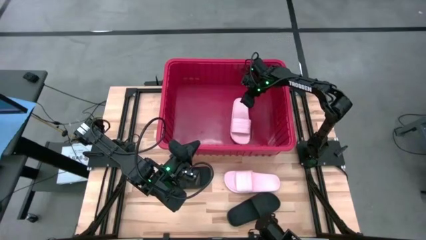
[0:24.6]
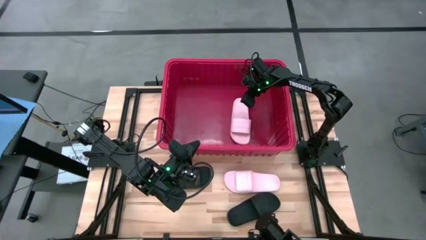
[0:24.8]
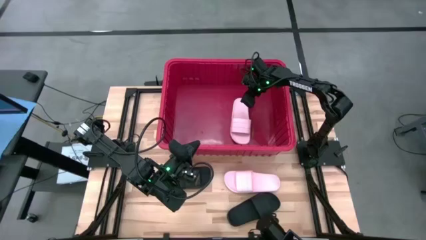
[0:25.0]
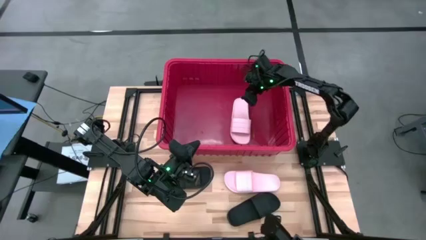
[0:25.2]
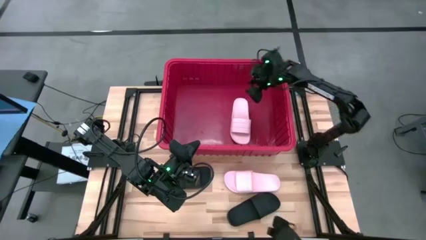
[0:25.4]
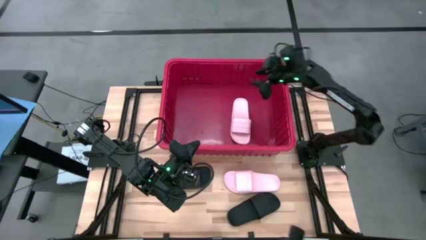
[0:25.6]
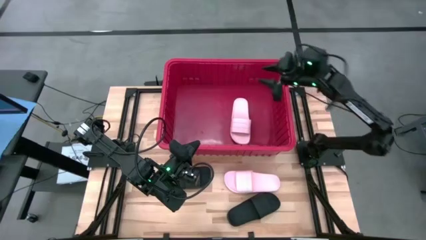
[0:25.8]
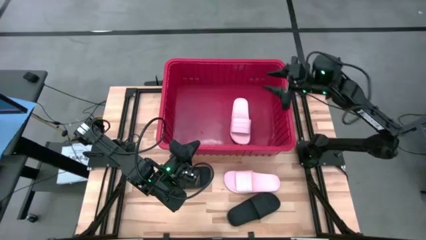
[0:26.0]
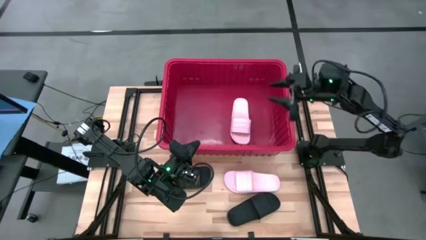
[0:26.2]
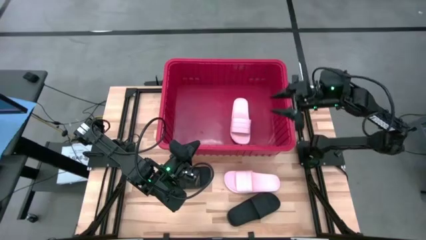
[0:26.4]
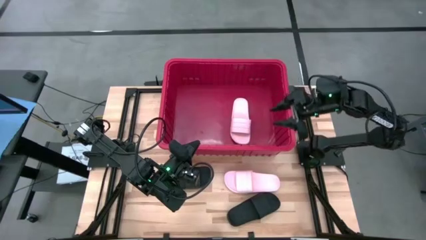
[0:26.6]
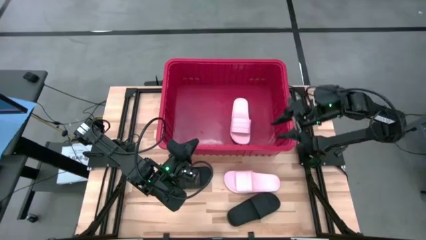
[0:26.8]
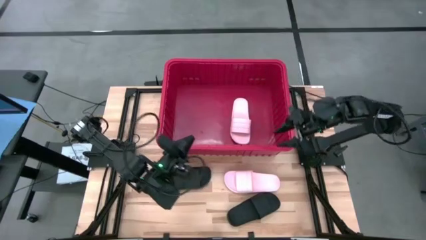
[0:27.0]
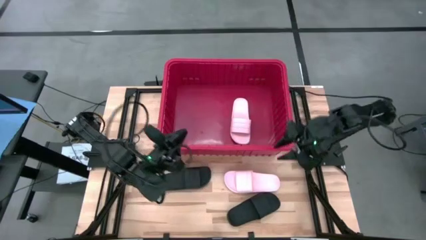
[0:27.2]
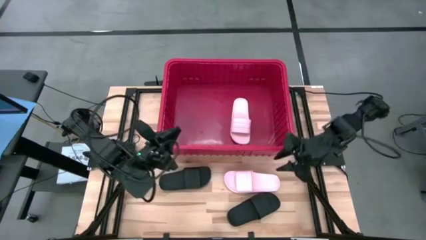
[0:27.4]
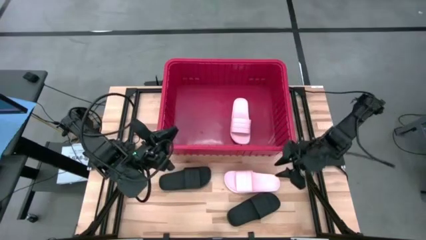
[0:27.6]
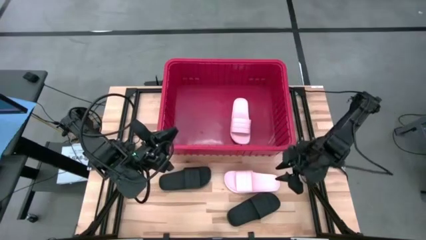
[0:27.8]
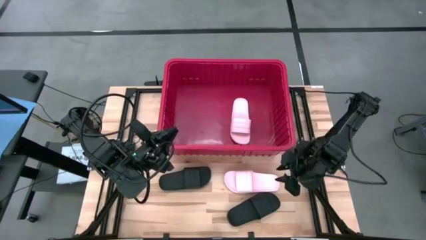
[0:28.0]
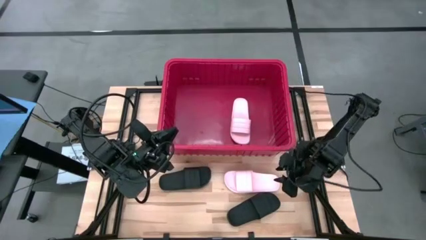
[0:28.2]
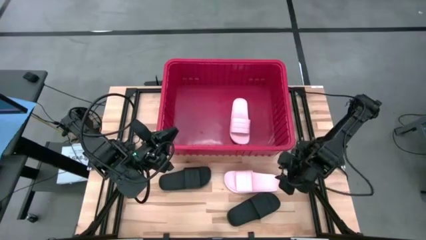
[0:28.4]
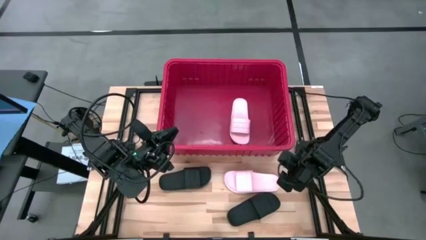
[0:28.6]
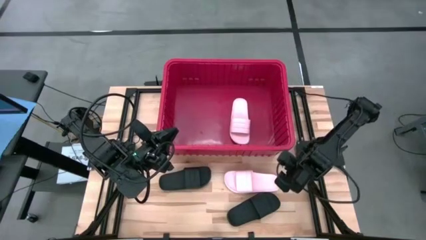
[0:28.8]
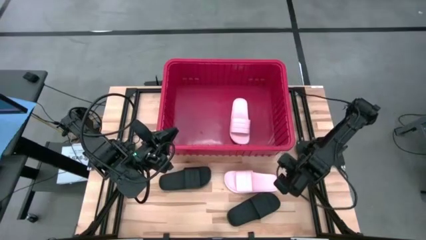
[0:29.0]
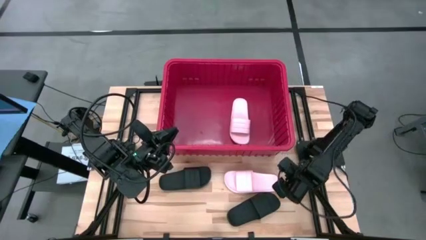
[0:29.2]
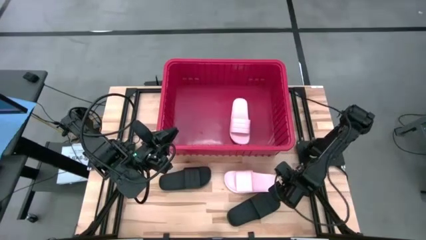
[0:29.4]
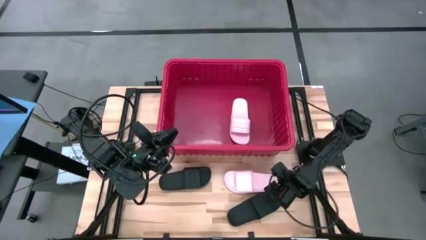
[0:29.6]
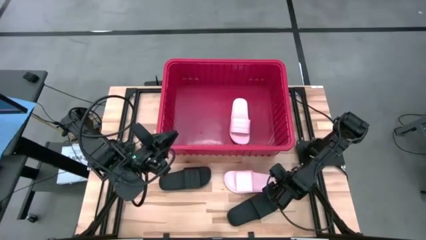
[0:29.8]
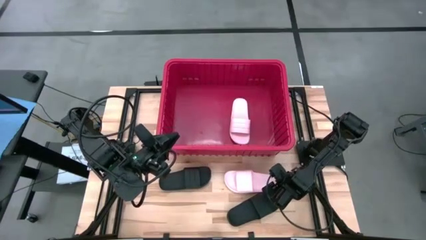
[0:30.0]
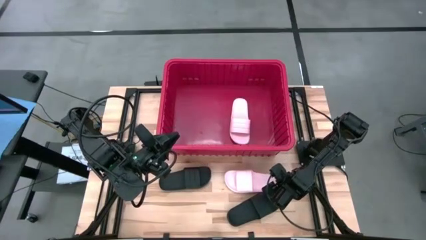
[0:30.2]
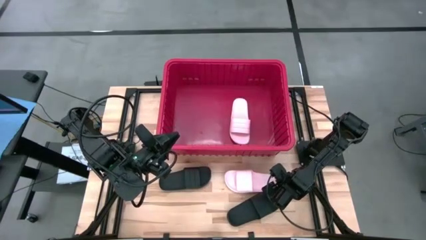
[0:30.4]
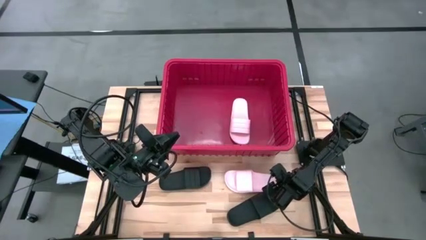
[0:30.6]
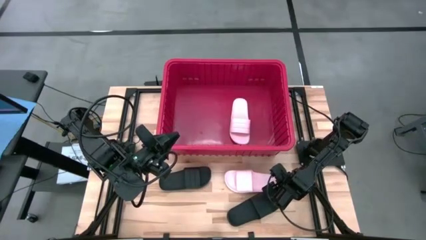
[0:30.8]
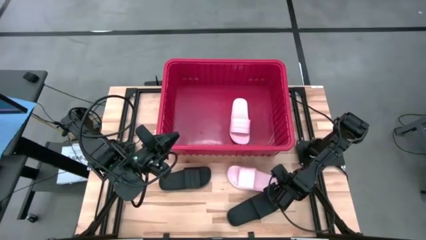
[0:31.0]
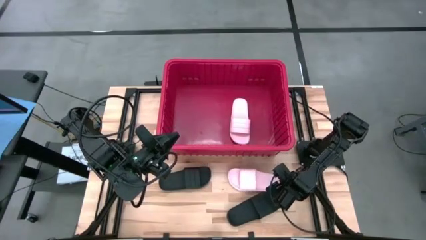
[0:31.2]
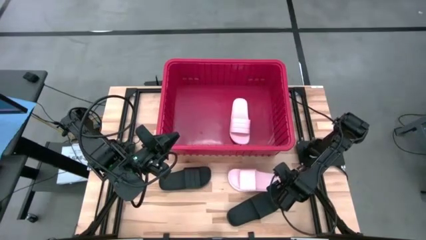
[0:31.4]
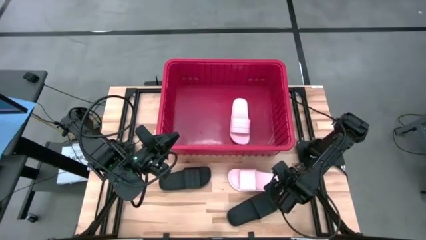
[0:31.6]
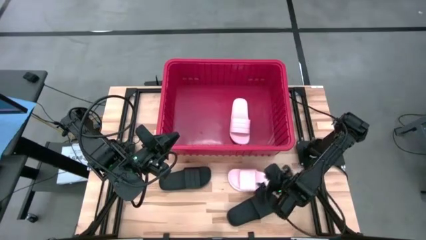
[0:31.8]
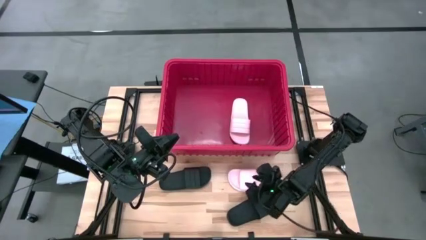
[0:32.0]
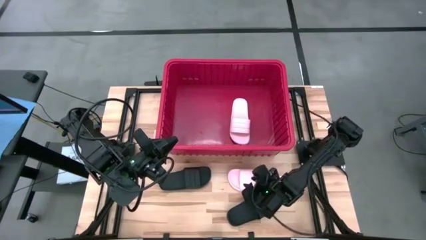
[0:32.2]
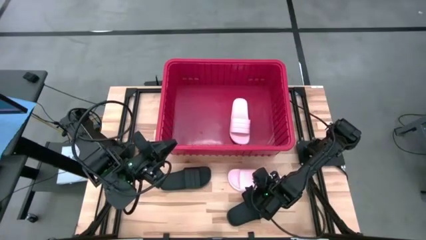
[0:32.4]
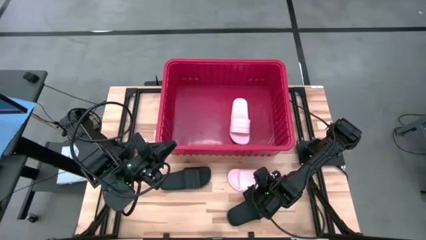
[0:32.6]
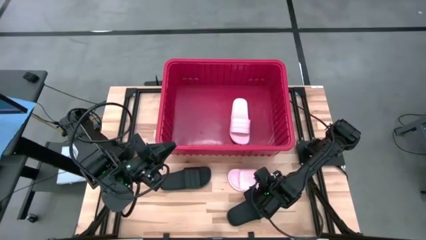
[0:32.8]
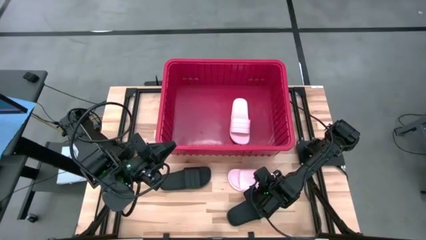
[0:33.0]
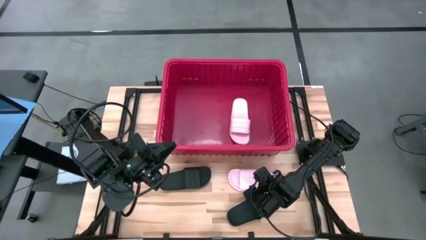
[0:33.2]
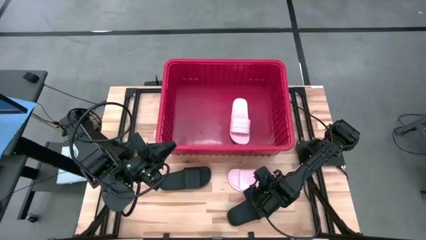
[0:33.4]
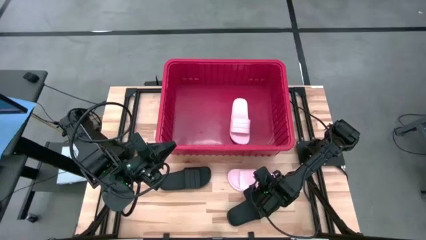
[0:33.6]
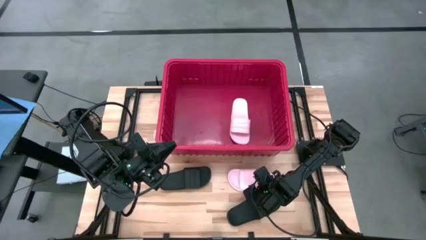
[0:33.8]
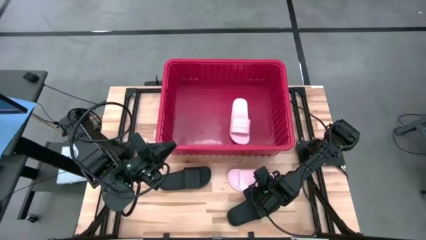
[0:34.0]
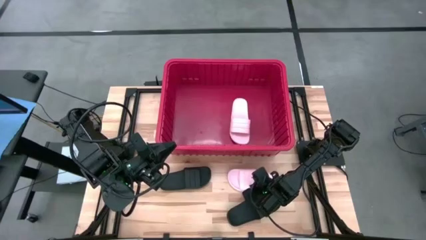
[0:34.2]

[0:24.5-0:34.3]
Task: Pick and place slides into bin
Put the pink slide into the bin

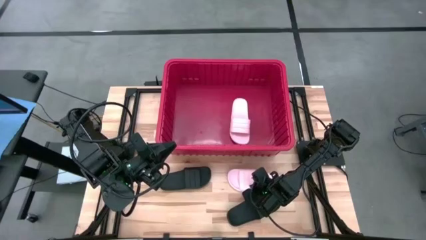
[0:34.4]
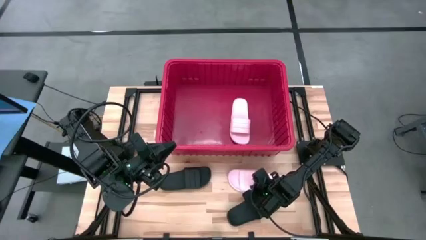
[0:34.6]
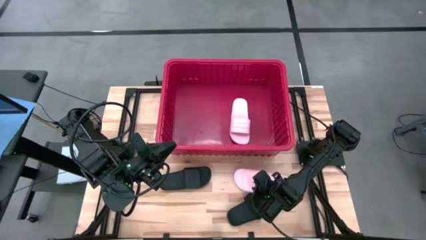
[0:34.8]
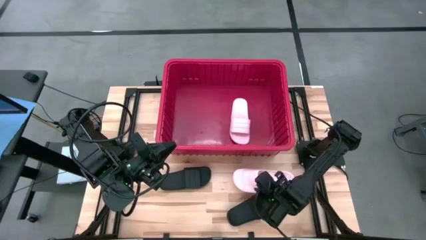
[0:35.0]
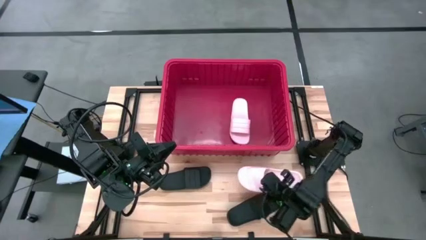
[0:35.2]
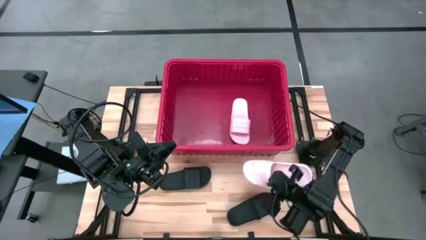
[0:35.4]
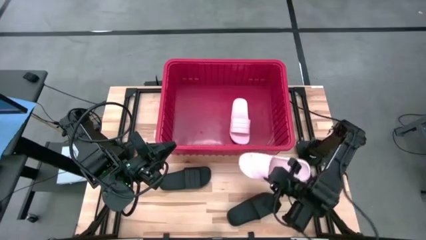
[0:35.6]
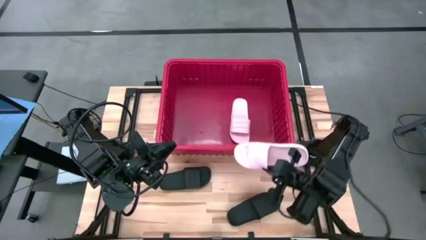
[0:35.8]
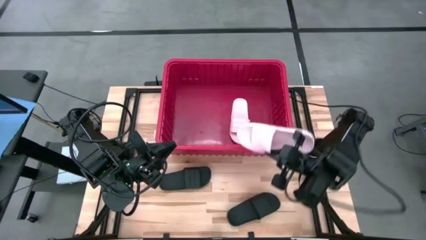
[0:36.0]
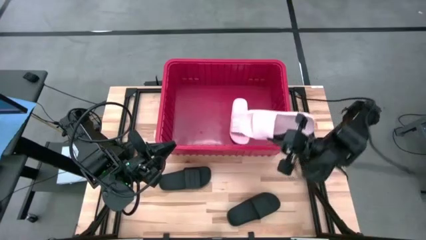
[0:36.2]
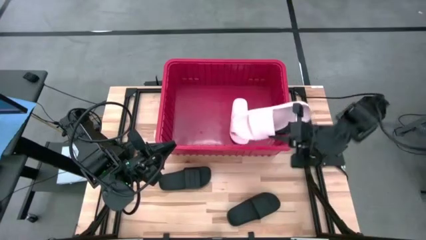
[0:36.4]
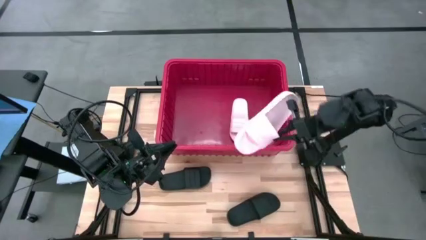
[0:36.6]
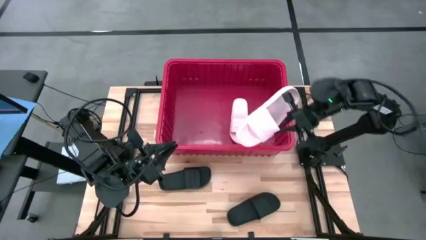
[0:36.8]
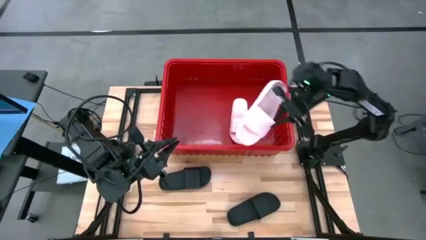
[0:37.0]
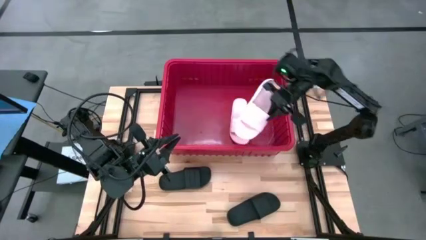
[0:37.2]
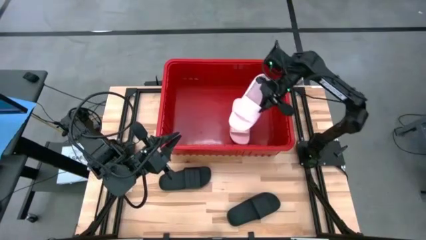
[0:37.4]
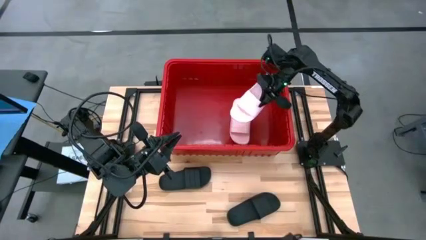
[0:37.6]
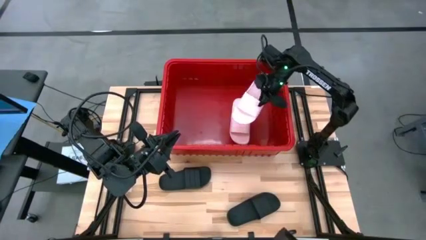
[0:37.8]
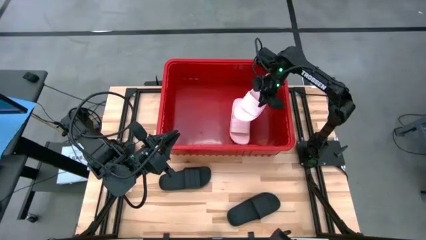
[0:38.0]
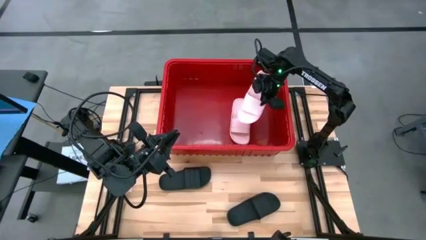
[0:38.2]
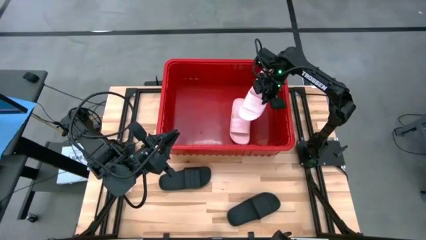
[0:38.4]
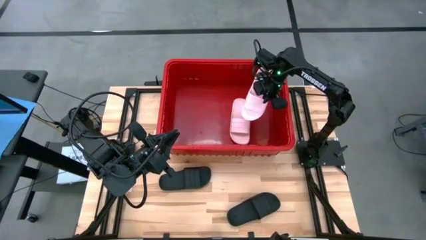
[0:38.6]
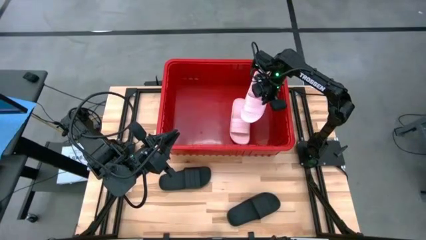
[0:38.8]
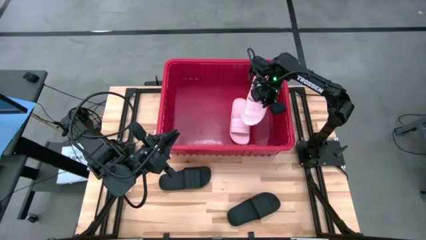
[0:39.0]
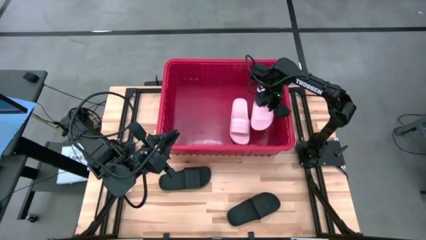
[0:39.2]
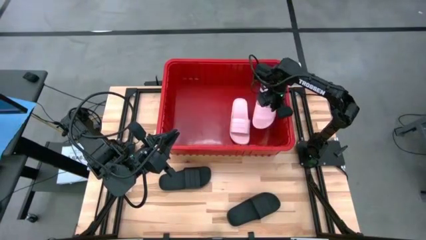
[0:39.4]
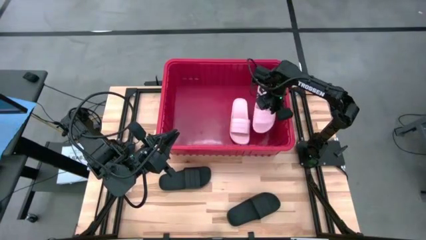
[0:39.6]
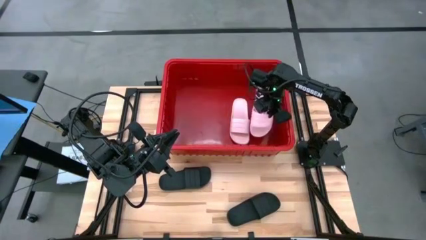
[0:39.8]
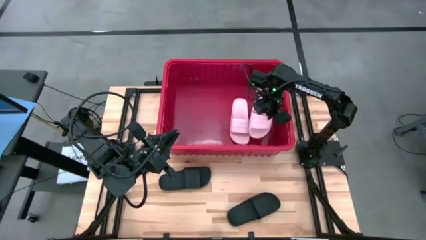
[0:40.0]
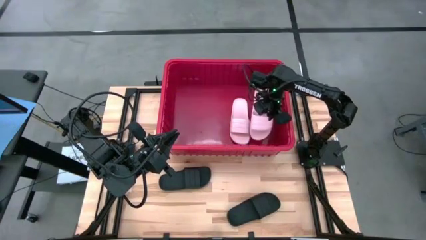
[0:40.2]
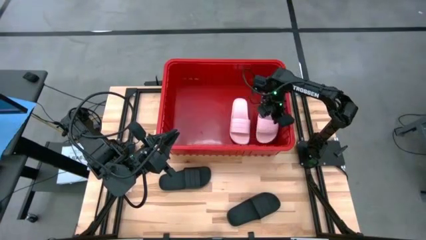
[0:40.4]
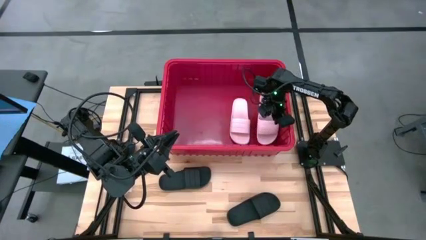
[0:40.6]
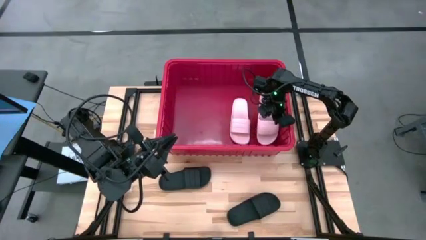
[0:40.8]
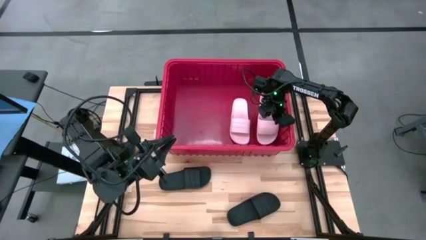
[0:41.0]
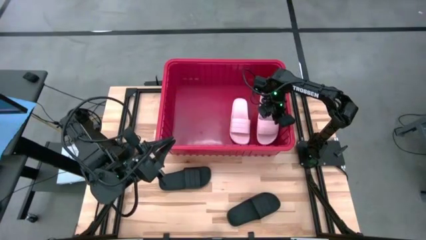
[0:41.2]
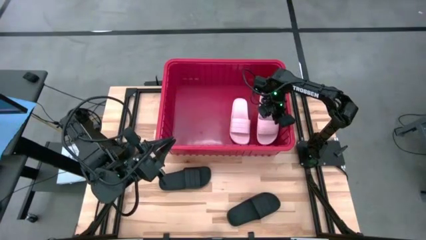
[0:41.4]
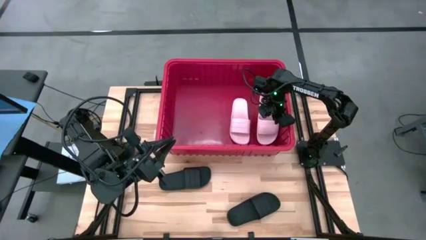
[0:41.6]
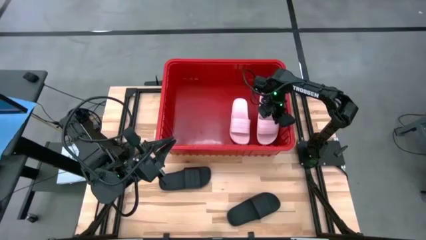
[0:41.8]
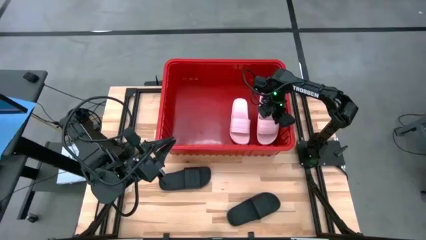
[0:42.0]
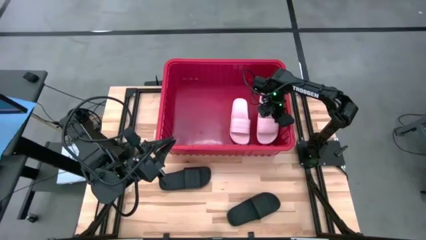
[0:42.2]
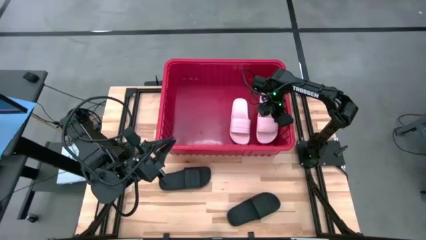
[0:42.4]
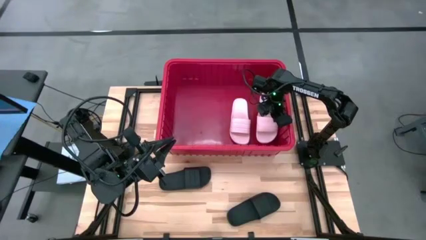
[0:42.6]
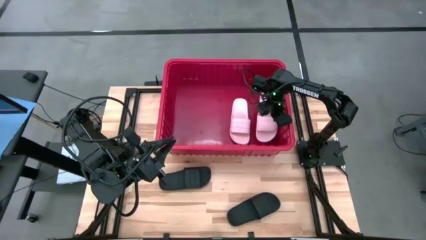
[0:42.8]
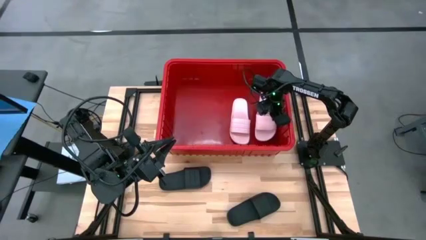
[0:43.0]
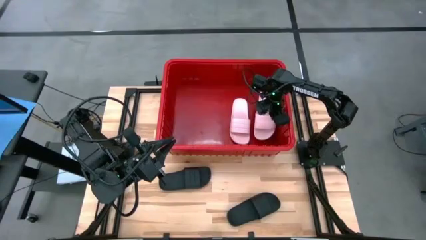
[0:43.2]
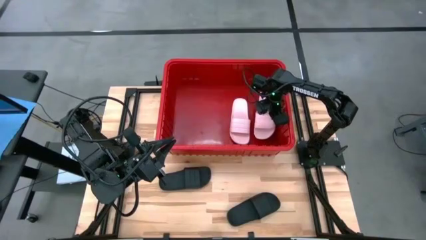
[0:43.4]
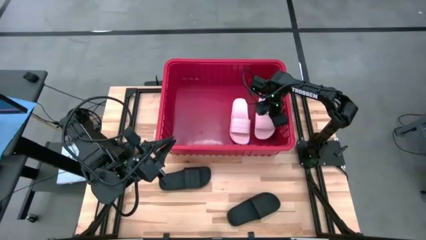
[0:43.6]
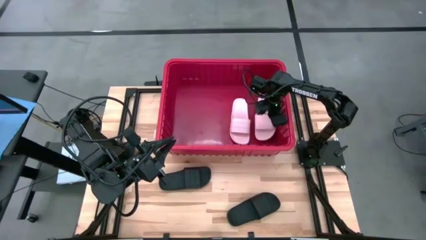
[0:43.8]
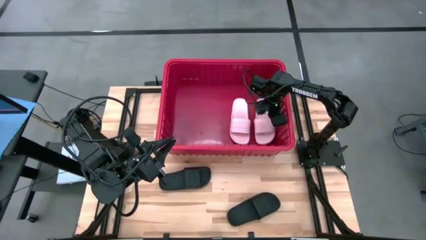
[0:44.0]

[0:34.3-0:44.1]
Put the pink slide into the bin
